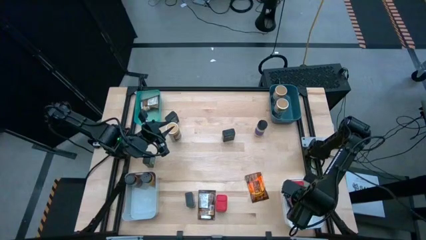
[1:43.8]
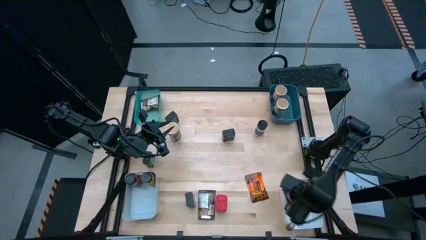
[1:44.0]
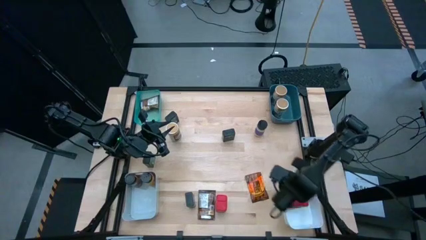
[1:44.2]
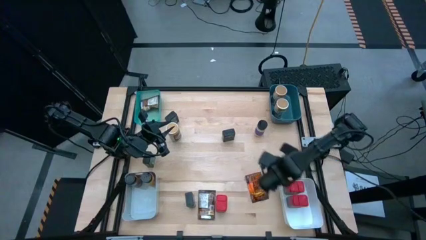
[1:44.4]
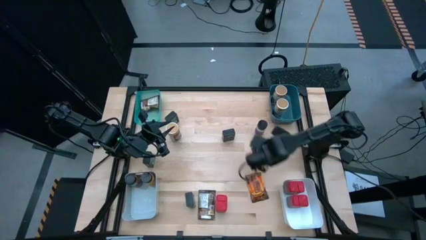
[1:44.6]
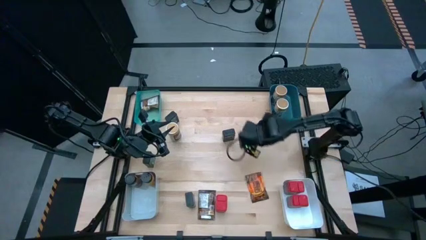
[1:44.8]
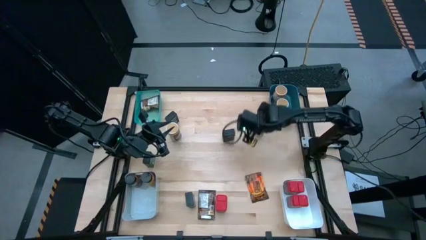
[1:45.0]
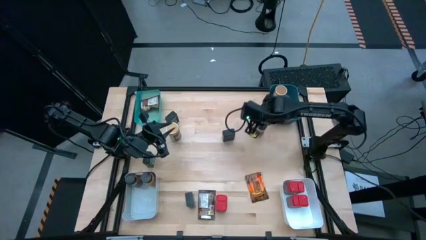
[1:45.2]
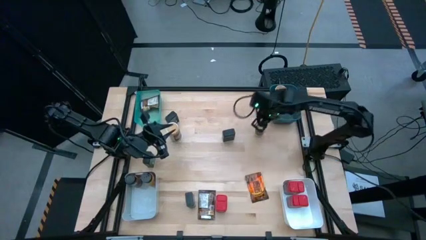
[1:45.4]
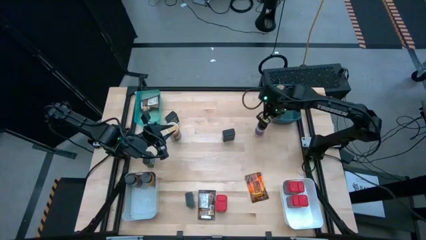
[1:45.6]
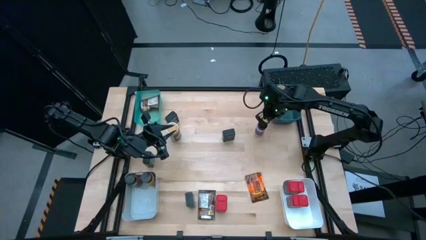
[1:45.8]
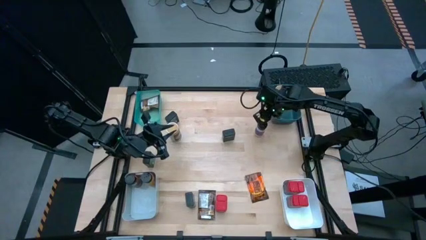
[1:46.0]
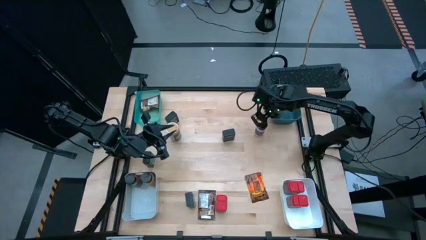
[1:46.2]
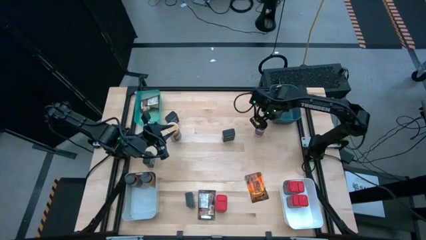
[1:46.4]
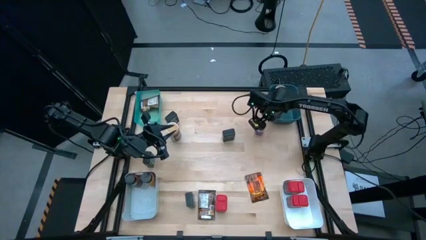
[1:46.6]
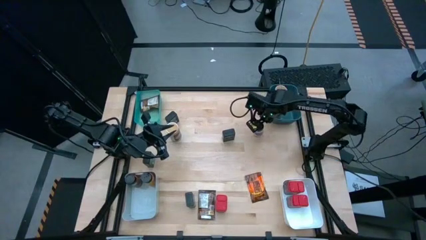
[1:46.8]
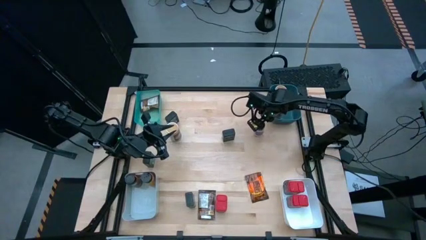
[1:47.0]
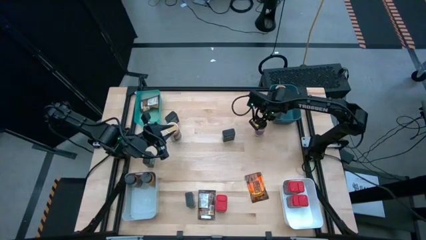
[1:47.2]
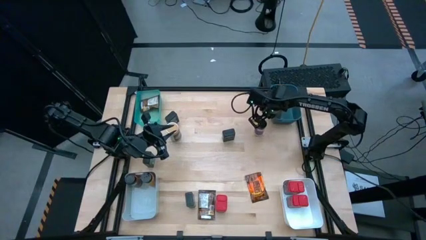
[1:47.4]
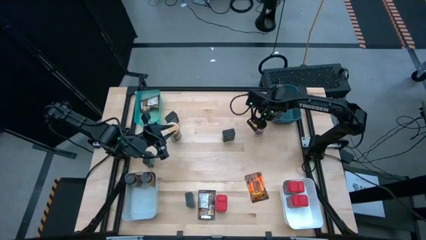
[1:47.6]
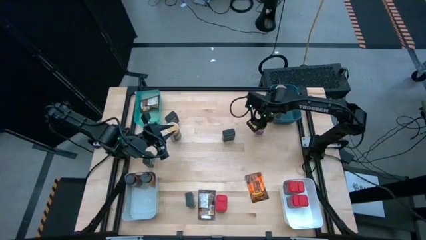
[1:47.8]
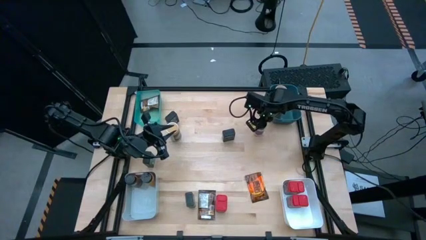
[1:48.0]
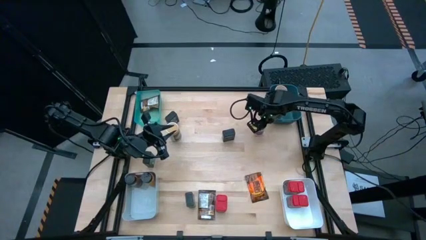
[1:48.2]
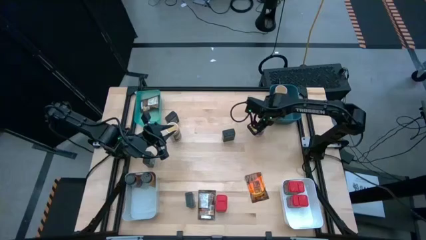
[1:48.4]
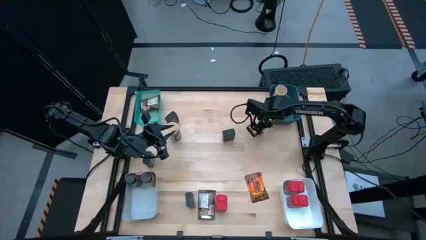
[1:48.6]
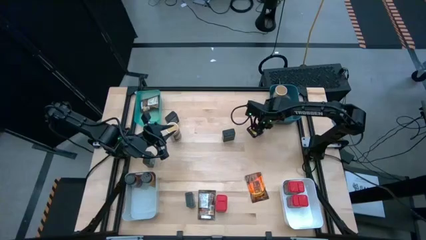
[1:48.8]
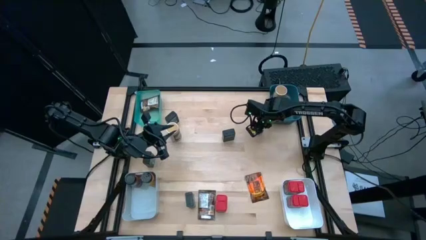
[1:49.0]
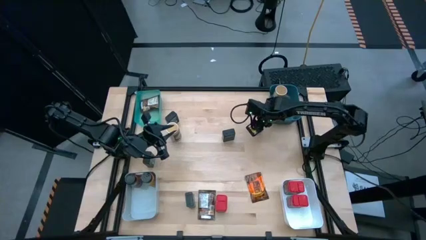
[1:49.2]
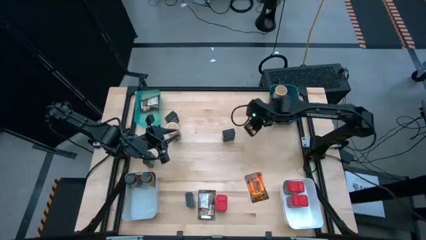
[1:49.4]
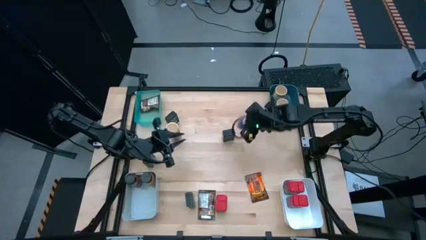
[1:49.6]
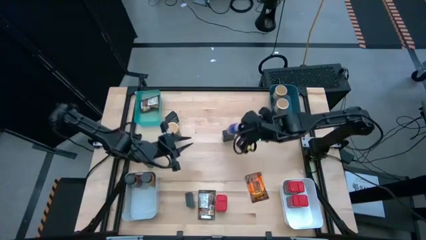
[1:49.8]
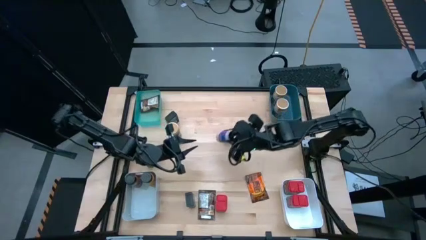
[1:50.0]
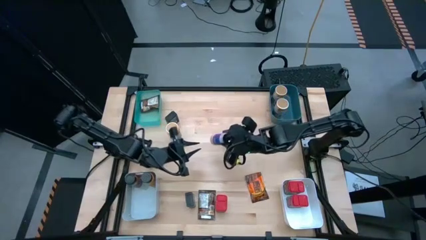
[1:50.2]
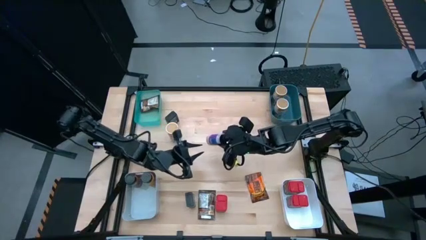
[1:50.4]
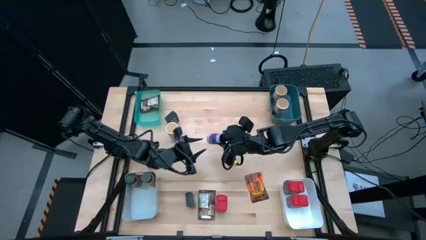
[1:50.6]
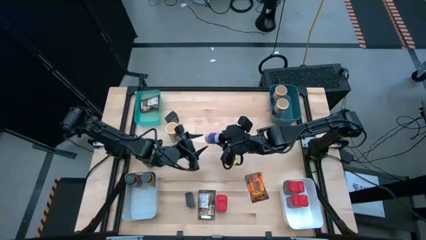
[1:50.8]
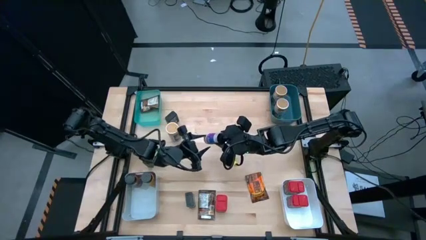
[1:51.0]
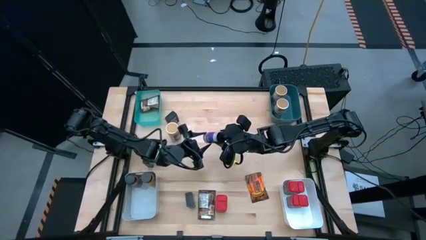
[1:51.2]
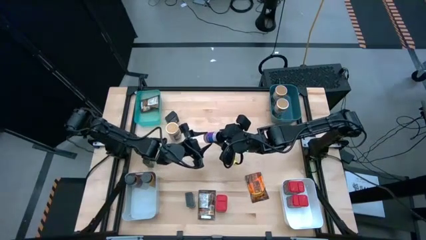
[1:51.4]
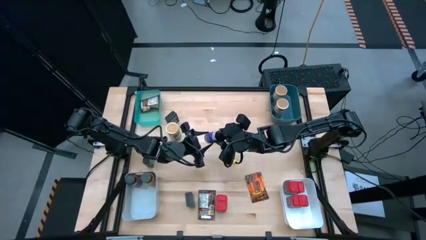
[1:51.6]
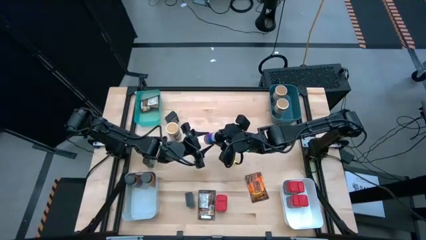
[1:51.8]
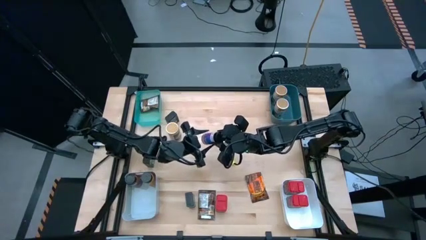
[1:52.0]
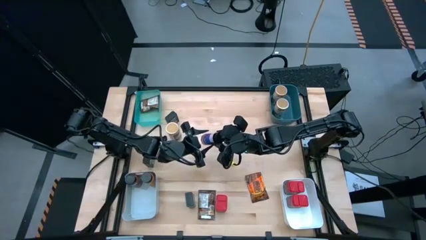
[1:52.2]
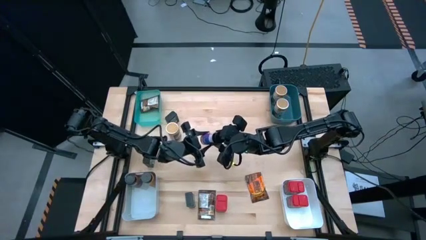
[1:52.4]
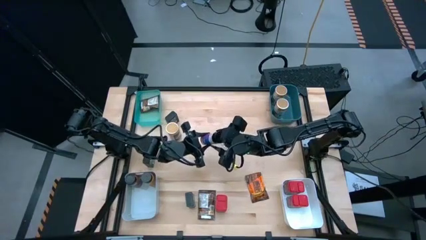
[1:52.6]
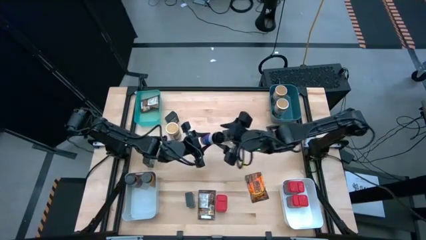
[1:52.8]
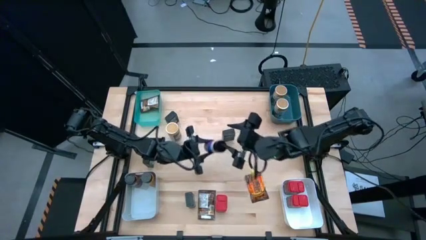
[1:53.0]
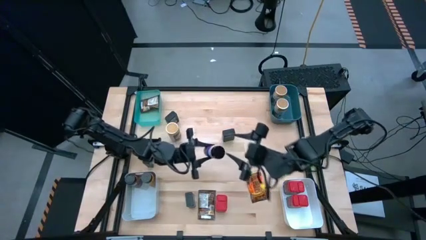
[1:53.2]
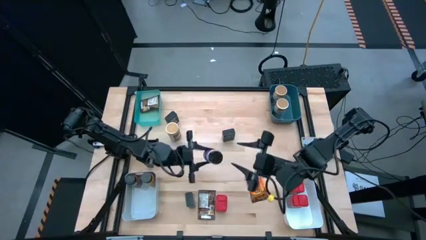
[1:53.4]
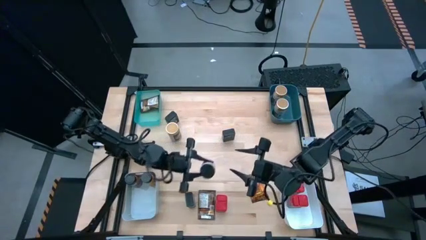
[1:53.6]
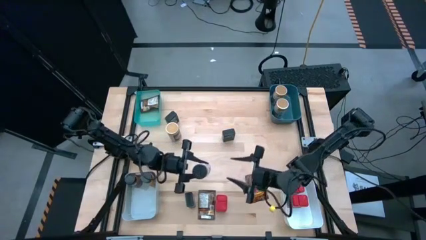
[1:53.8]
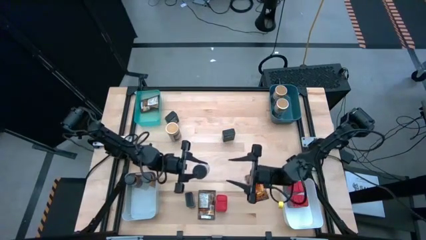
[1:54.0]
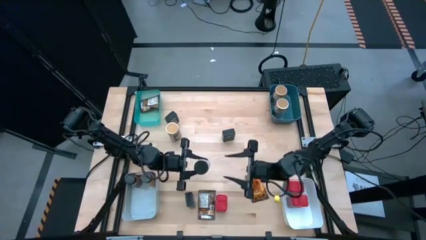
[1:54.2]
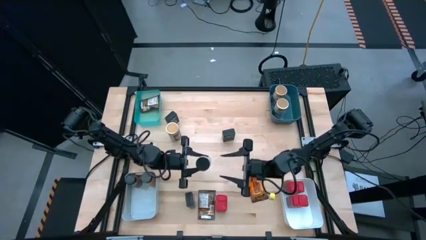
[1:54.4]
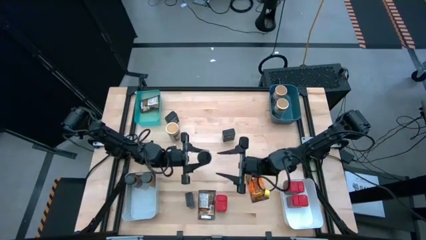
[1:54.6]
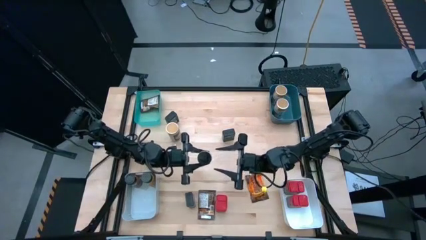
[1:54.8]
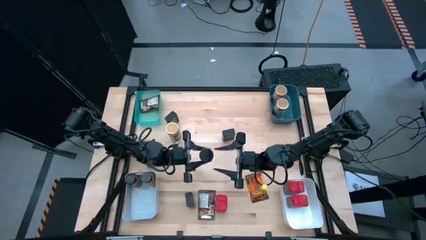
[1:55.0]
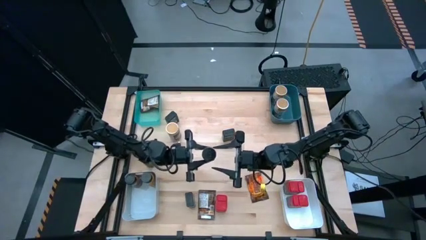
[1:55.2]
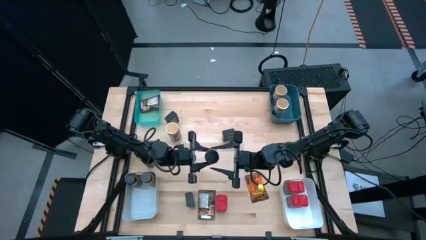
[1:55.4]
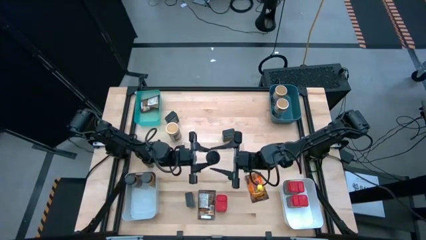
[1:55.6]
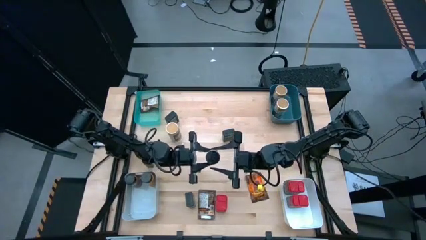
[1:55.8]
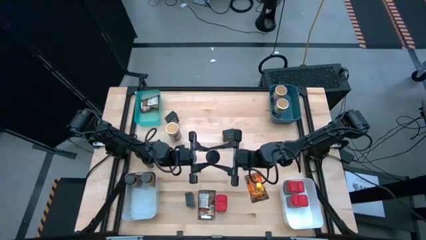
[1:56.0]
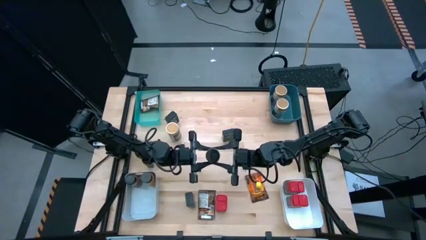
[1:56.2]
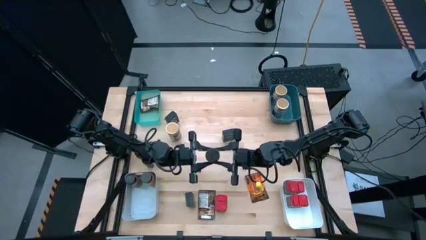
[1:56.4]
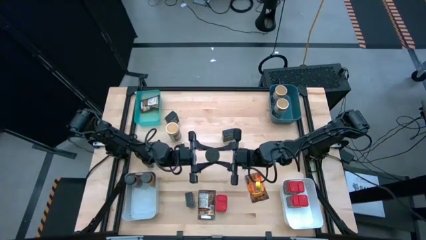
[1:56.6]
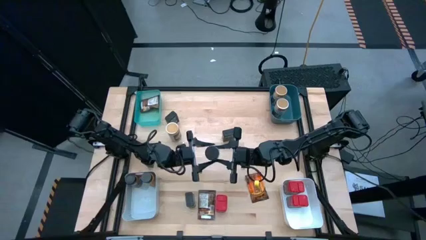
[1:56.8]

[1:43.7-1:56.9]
Task: Sort spices by type
Put the purple seasoning bottle into the gray bin
